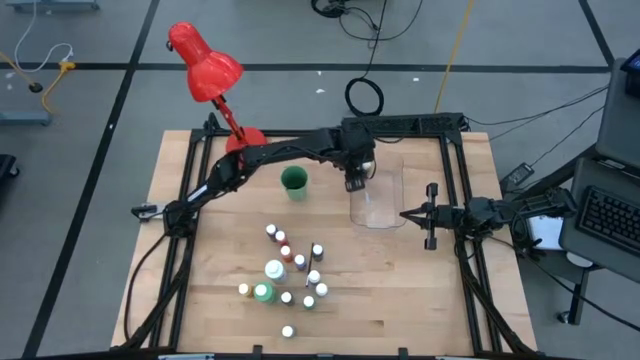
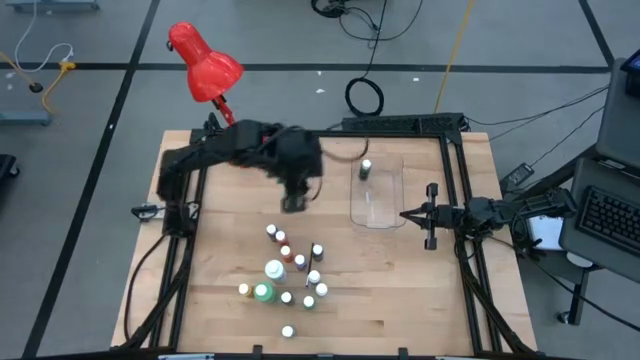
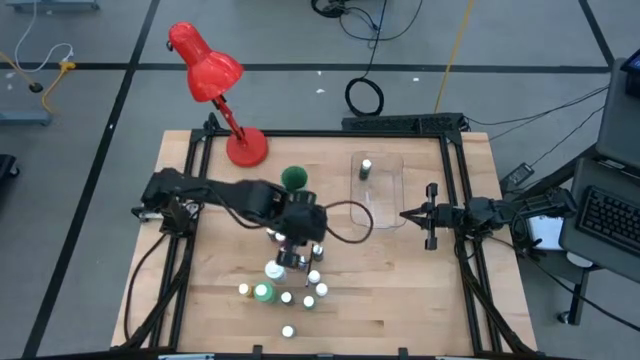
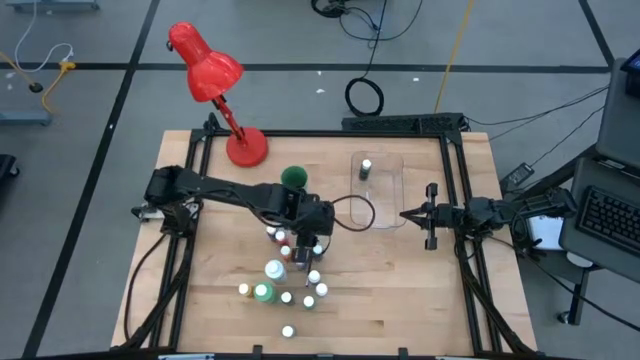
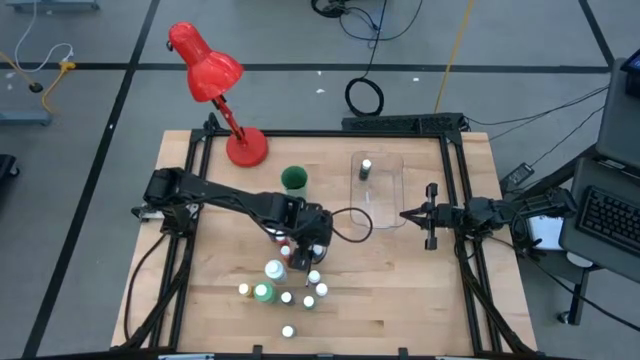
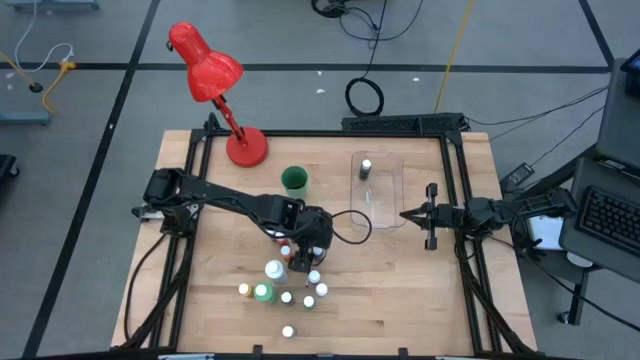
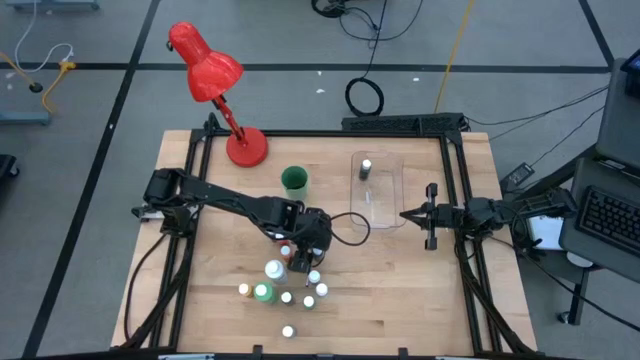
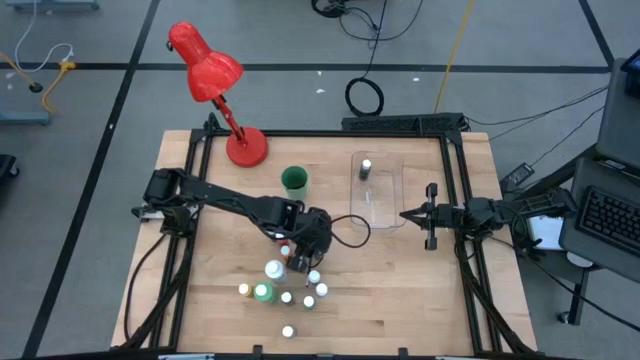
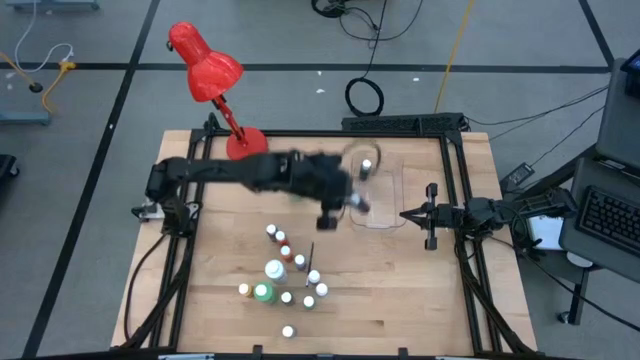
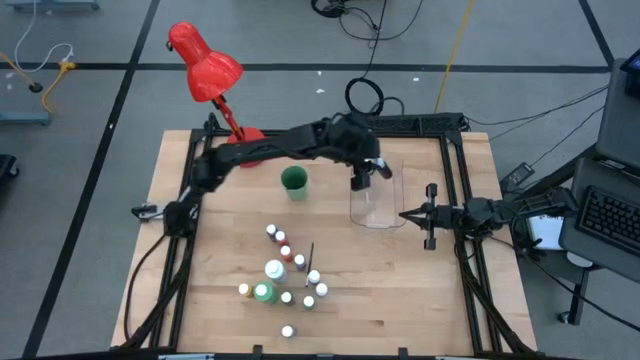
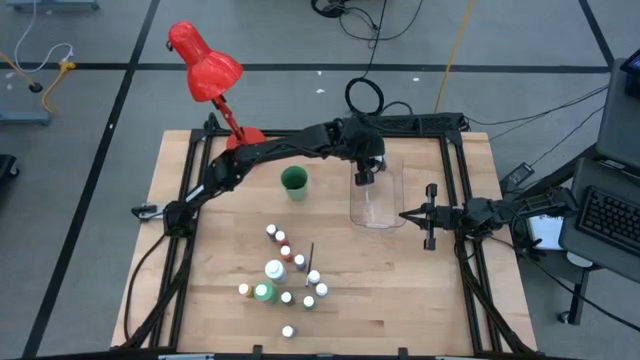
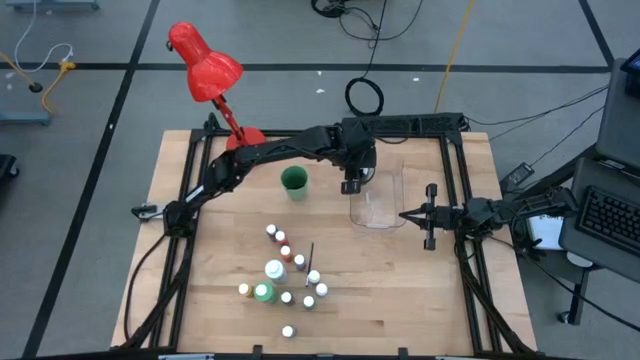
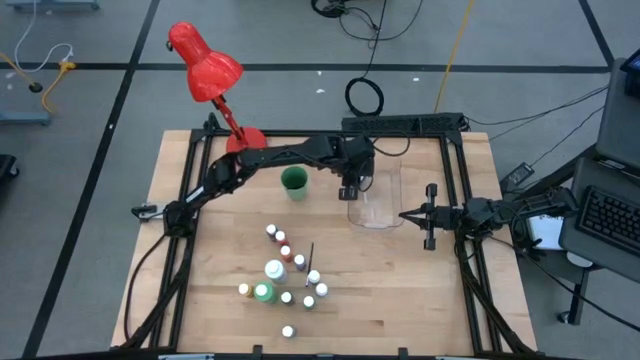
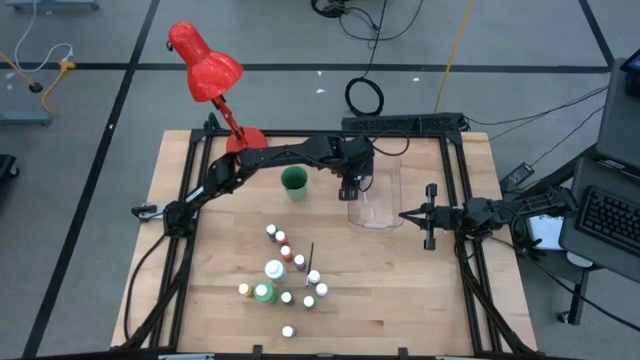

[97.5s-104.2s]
Task: Pick & Place Paint Supplies
Put the black paint bottle into the transparent bin

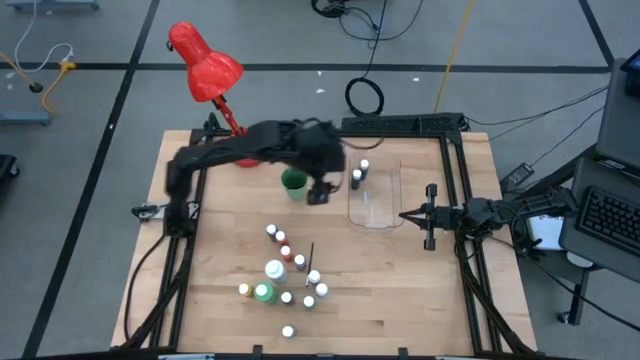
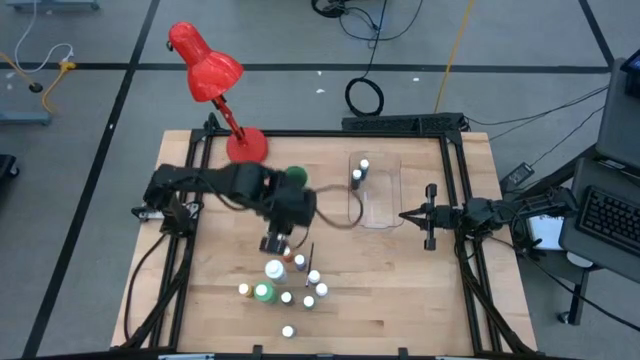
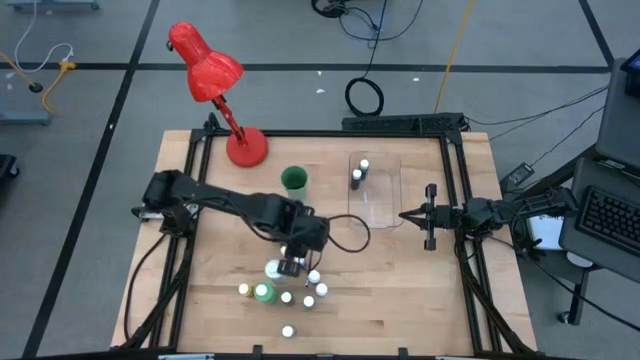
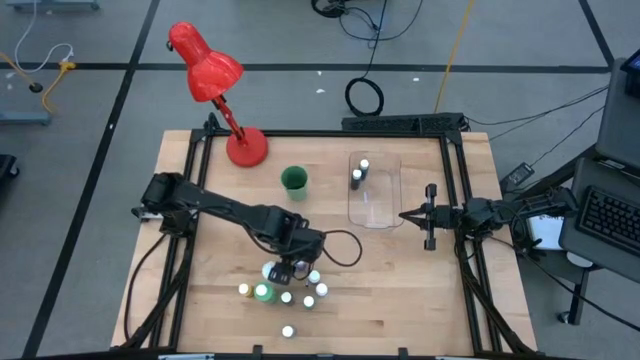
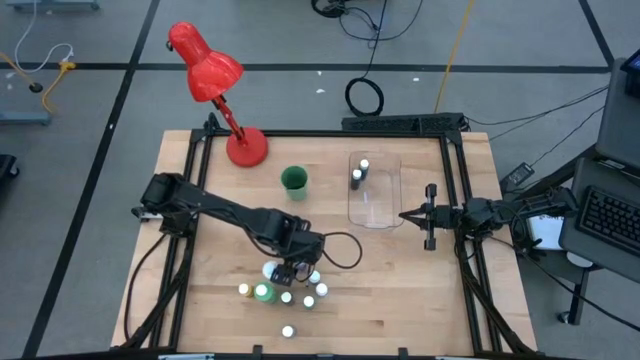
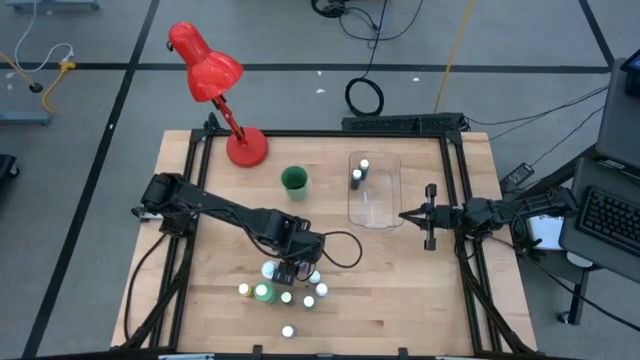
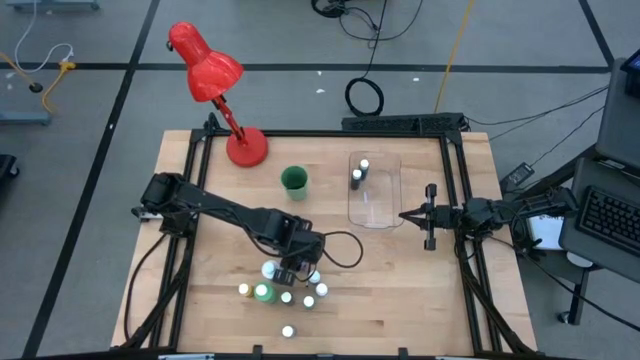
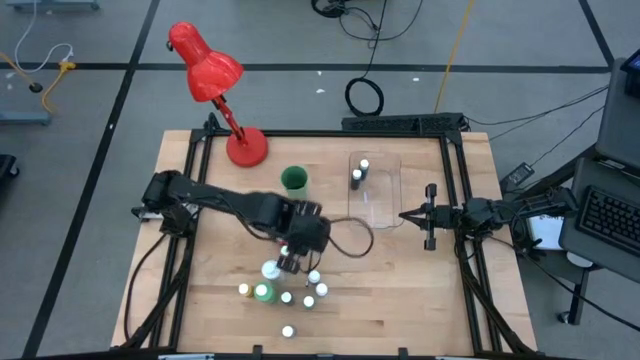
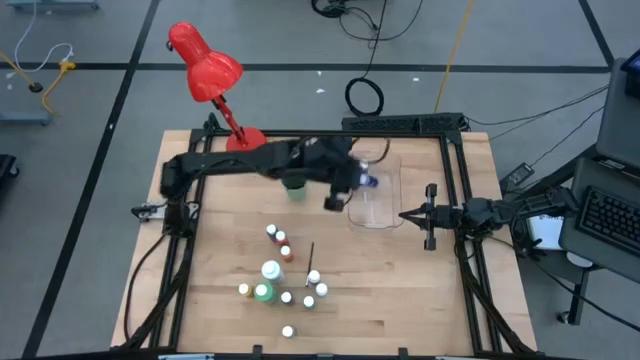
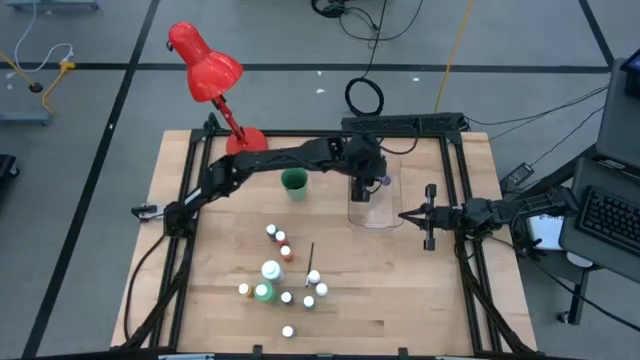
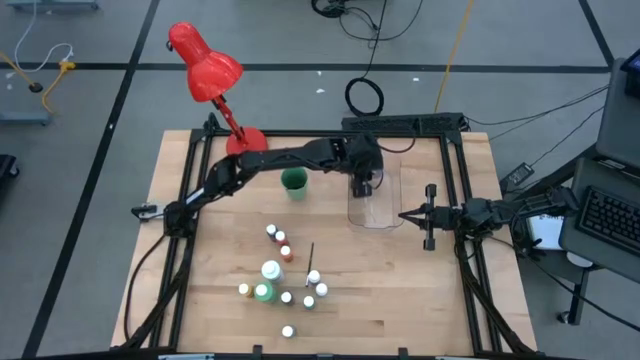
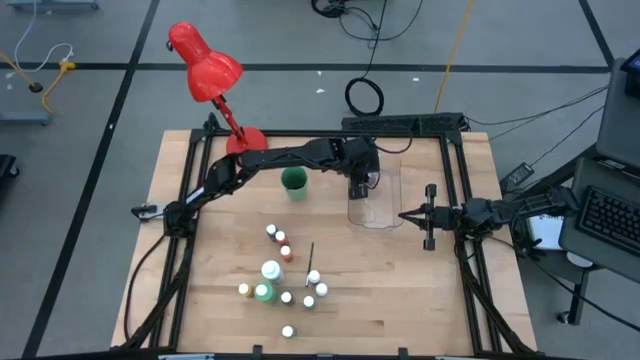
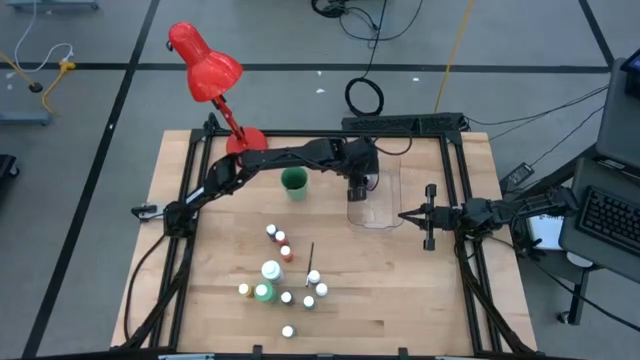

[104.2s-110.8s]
Put the blue paint bottle into the transparent bin

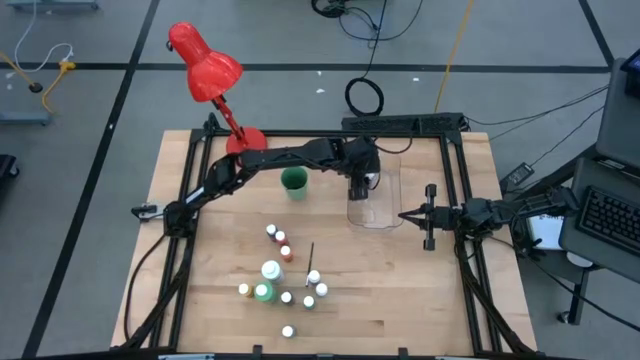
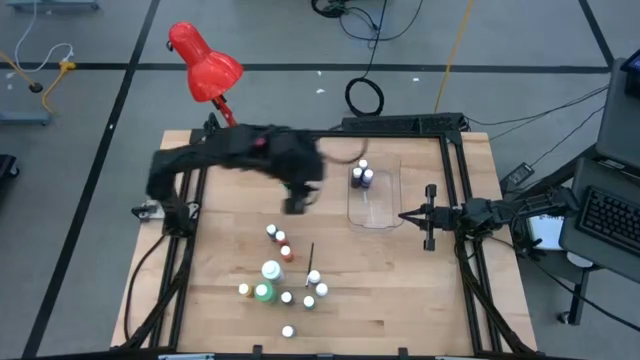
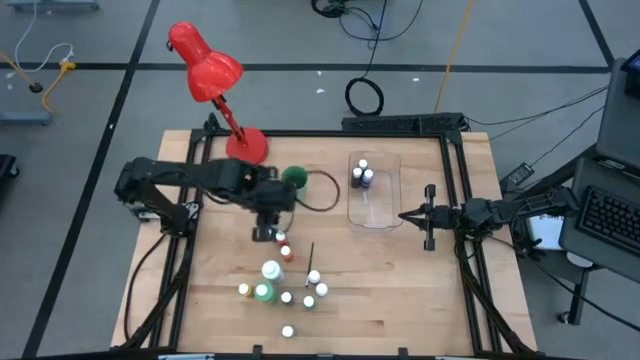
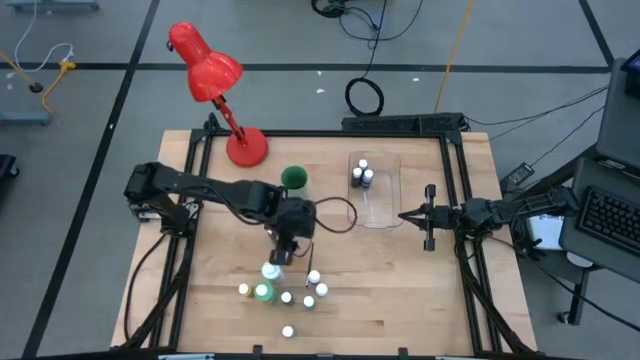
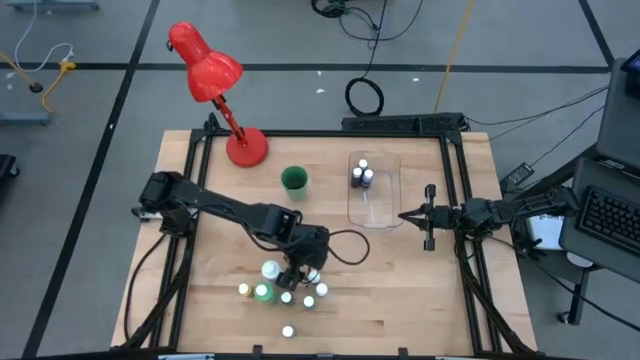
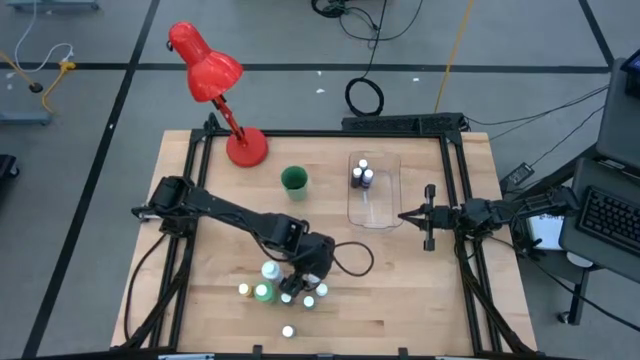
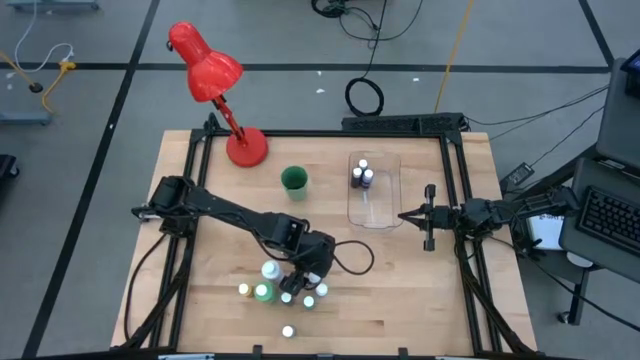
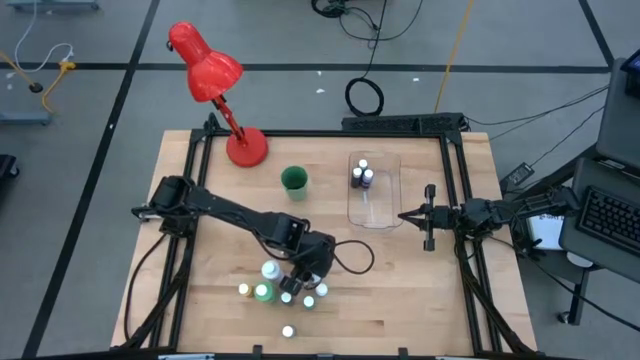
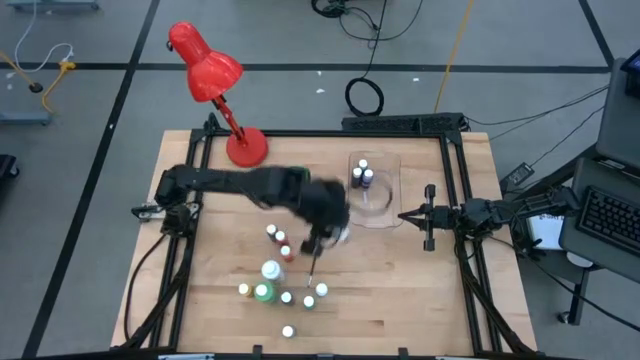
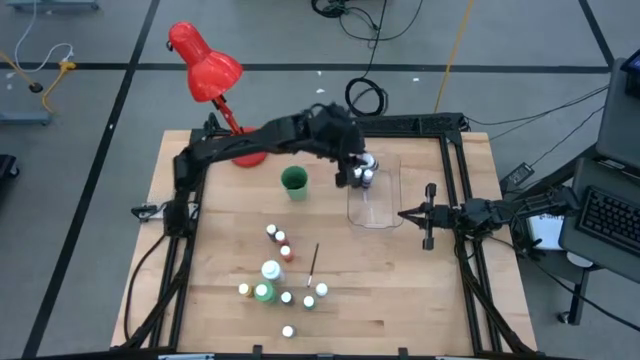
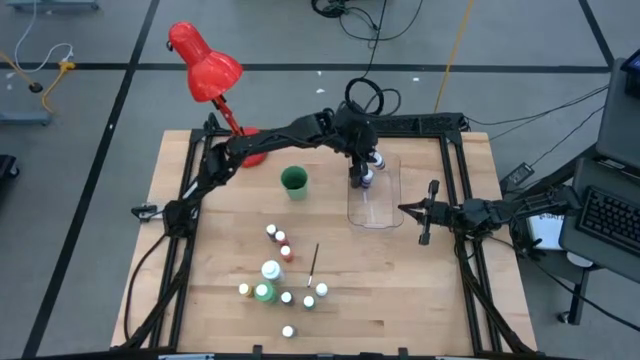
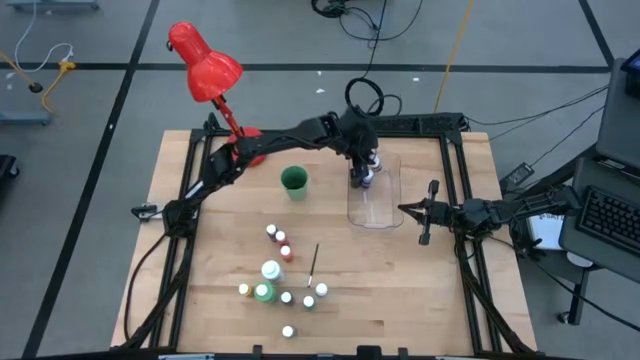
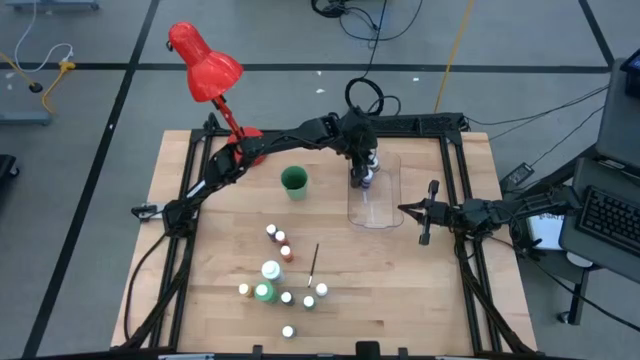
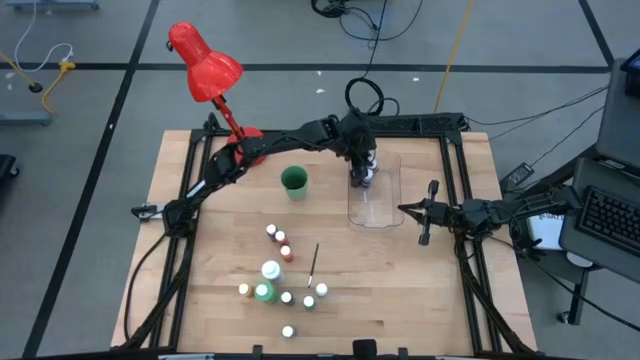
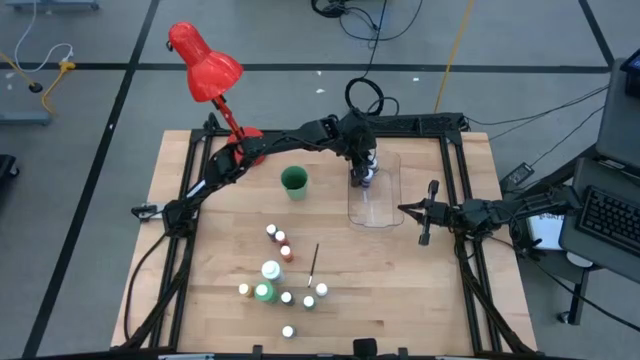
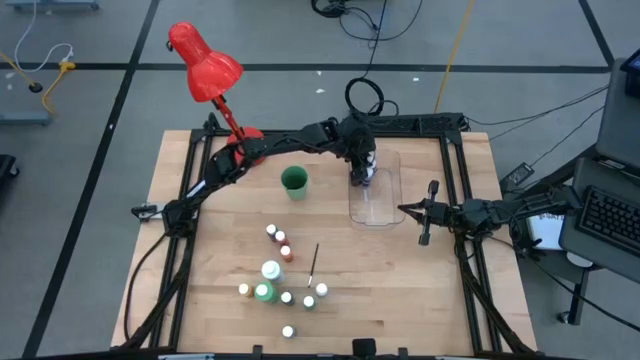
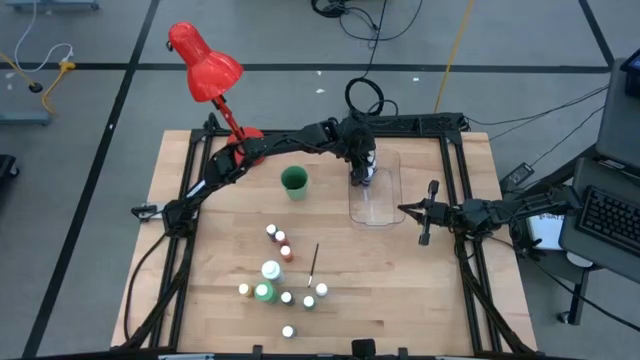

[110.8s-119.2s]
Put the white paint bottle into the transparent bin
